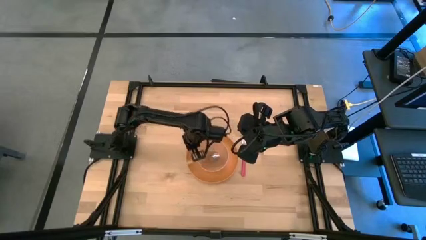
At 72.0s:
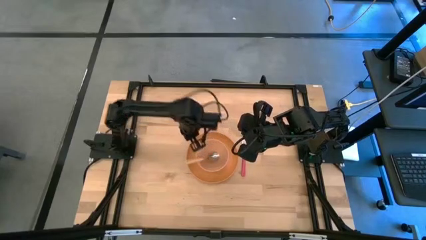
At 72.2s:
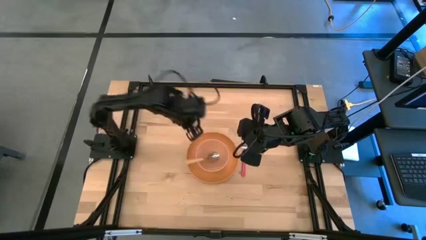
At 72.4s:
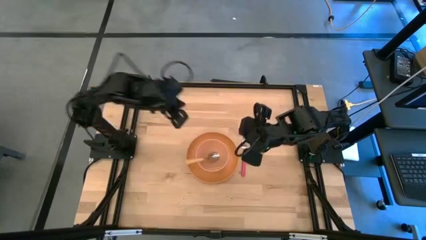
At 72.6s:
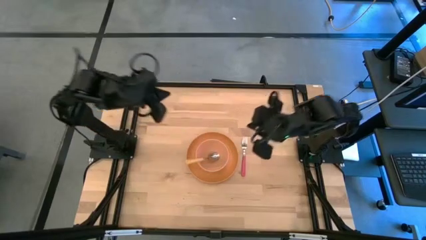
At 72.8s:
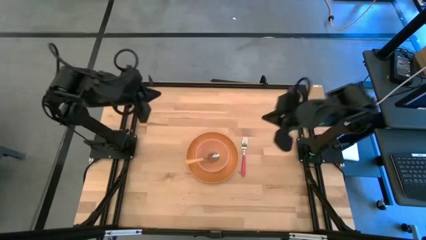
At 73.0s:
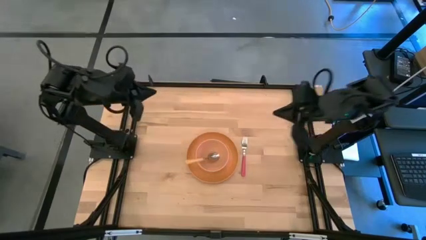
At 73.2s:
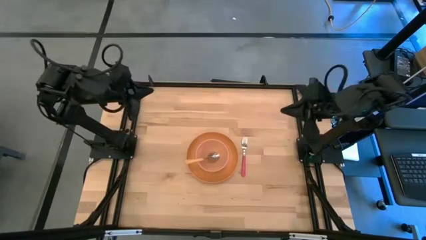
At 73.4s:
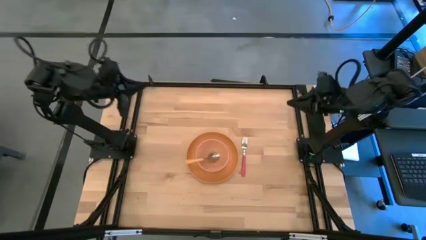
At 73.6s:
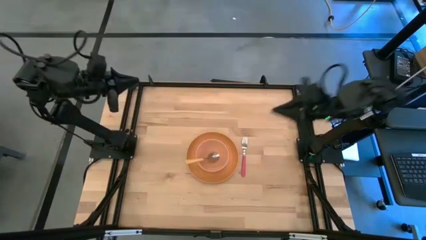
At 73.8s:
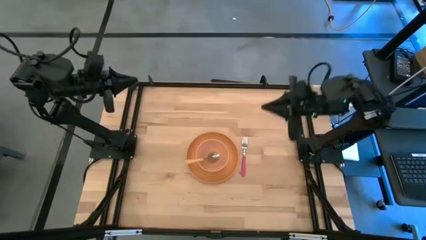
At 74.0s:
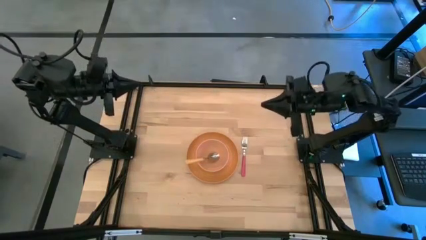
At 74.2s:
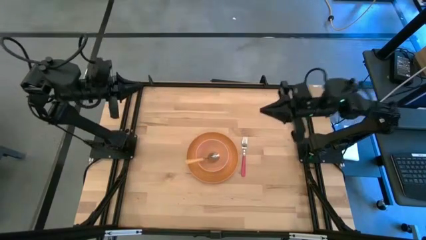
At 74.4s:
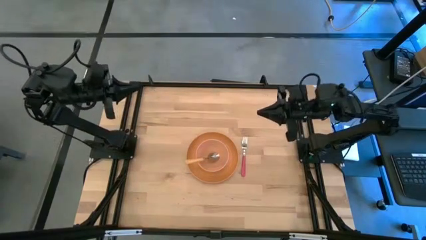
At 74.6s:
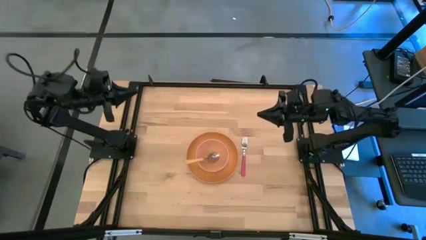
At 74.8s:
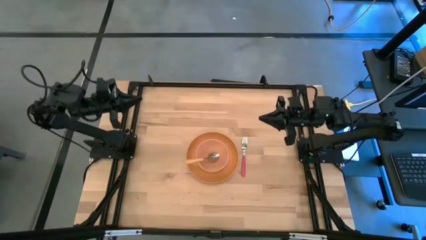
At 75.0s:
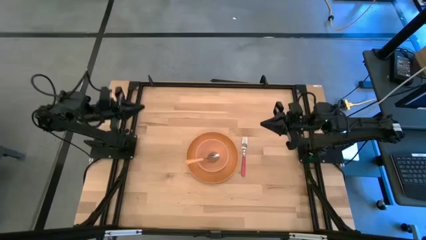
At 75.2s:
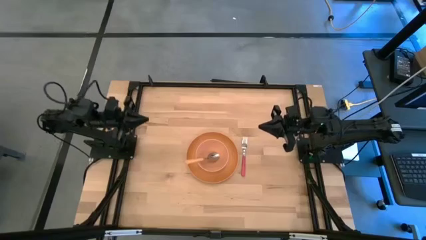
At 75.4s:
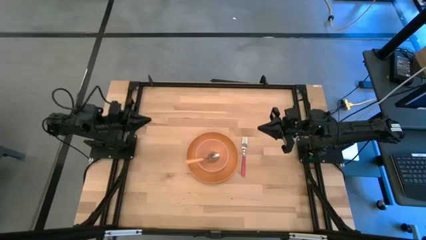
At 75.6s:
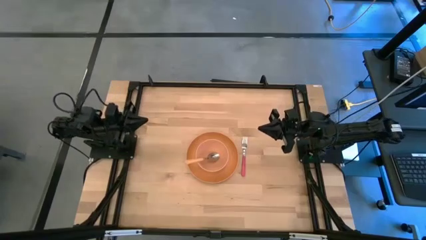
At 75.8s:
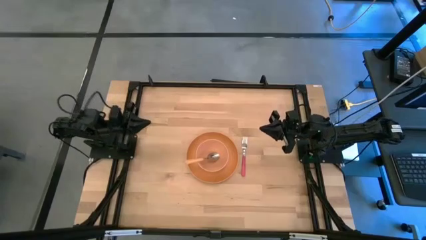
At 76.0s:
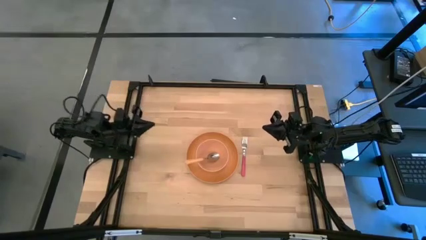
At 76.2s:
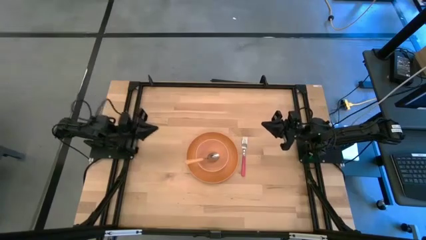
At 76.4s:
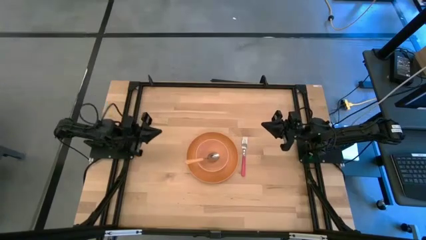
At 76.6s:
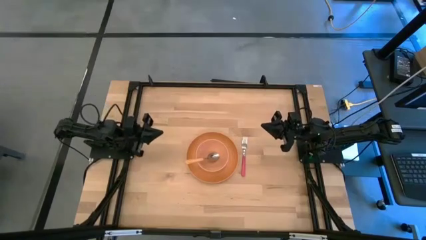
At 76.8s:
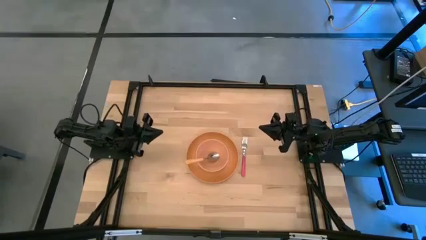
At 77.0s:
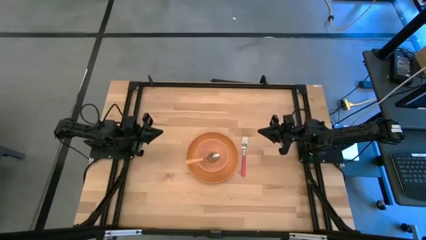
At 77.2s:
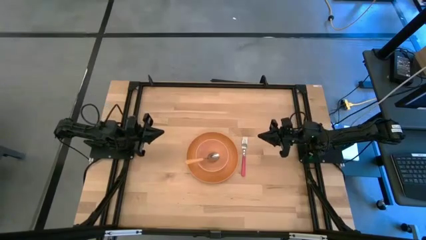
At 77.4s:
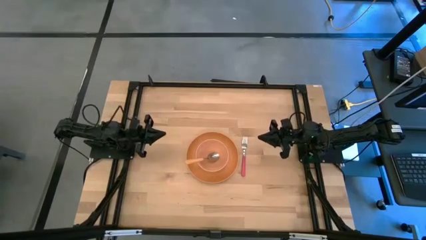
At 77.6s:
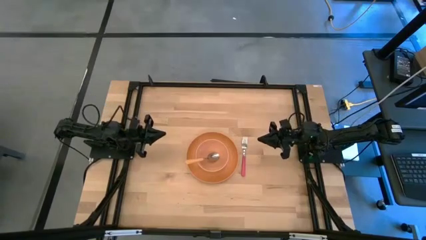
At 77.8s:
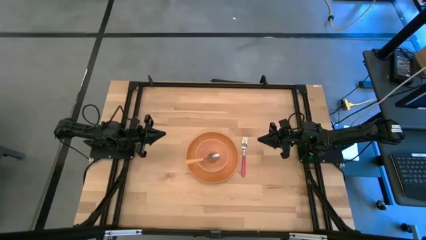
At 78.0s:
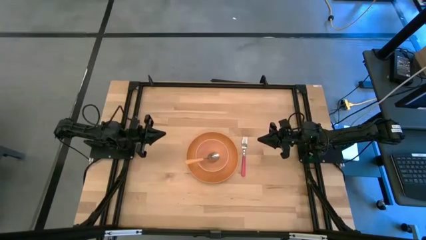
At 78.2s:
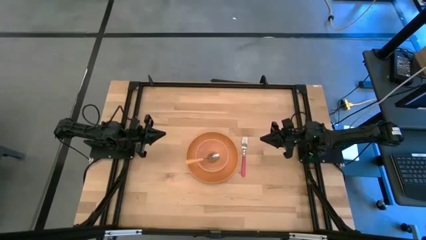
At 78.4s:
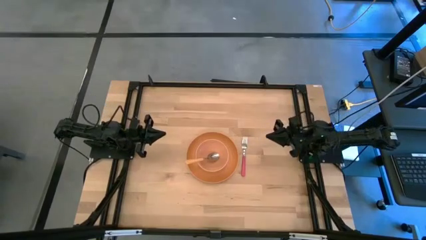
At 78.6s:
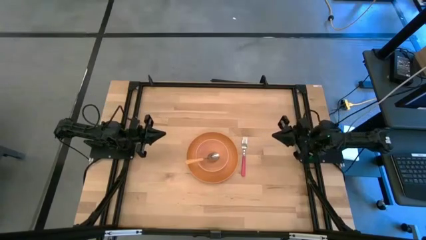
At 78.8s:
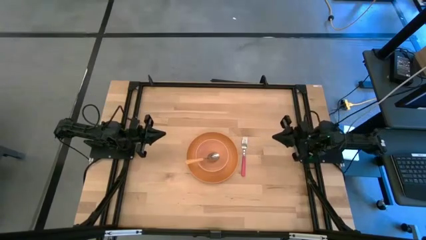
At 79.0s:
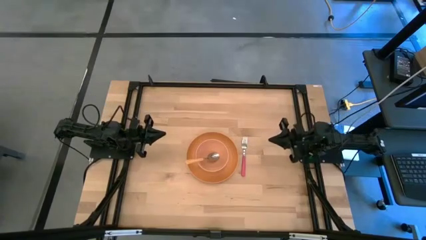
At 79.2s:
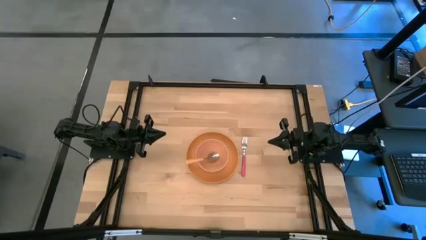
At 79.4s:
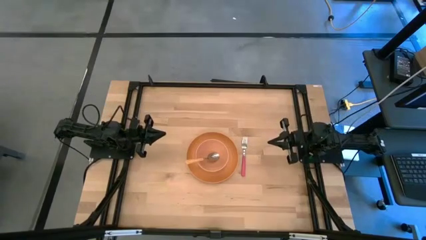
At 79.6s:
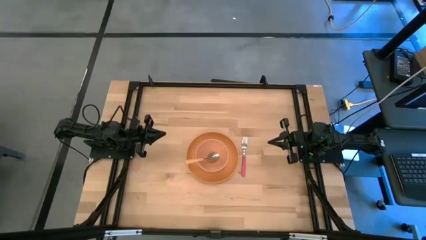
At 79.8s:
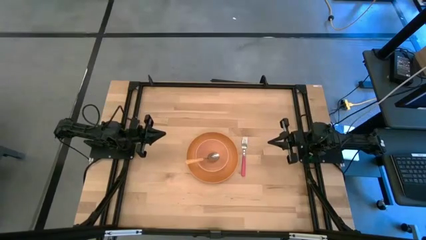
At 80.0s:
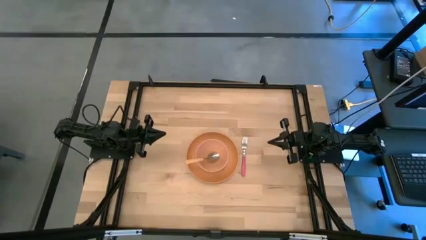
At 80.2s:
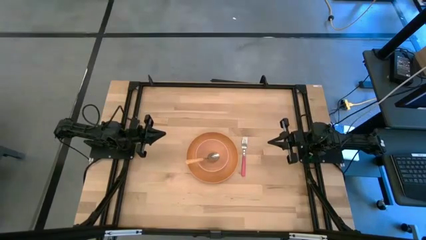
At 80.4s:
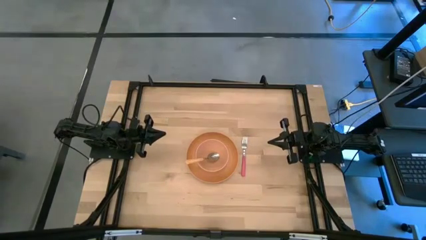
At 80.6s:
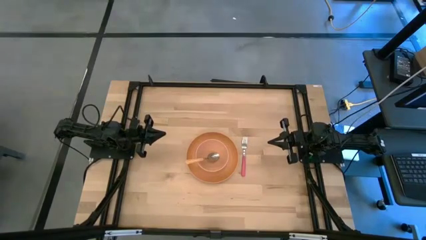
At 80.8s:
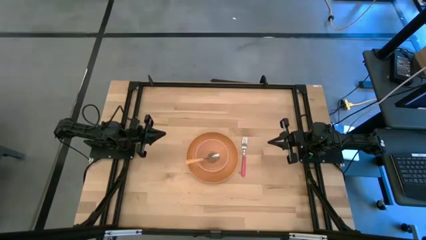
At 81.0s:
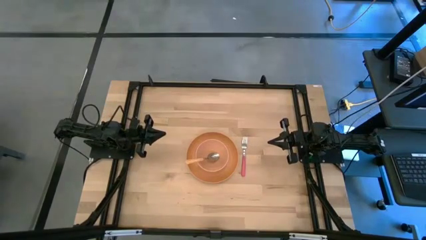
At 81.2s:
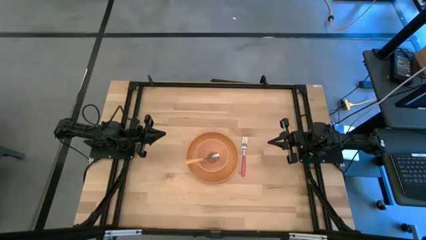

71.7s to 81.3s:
Task: Set table place
Return to Home Position

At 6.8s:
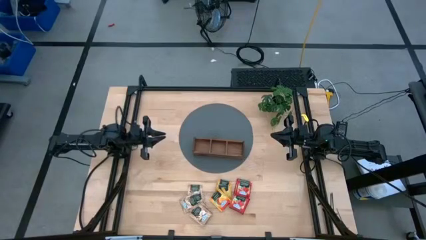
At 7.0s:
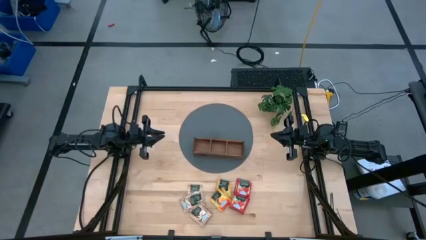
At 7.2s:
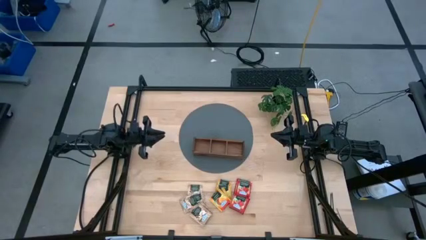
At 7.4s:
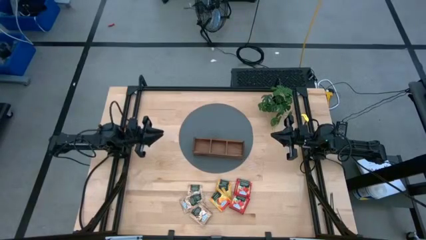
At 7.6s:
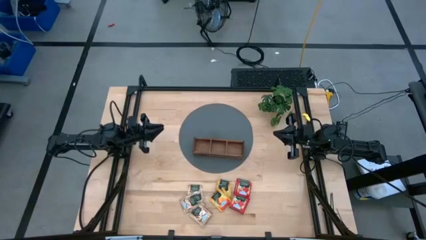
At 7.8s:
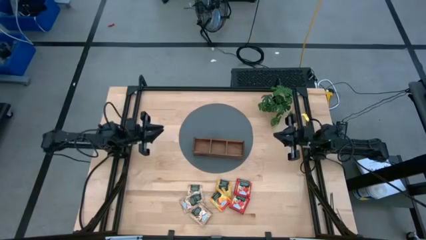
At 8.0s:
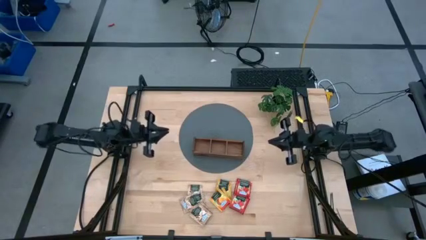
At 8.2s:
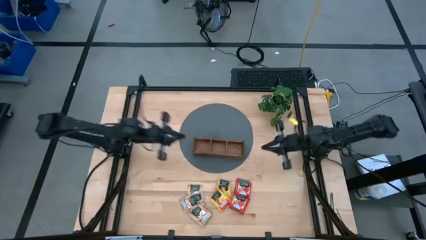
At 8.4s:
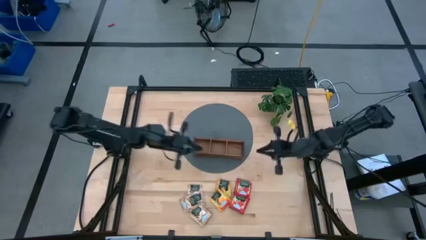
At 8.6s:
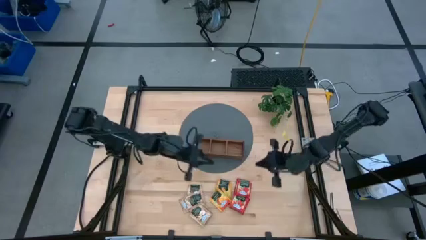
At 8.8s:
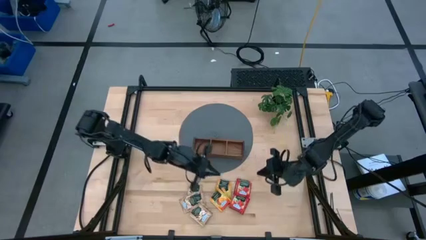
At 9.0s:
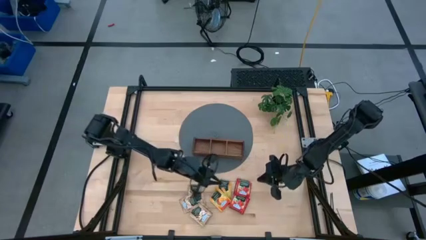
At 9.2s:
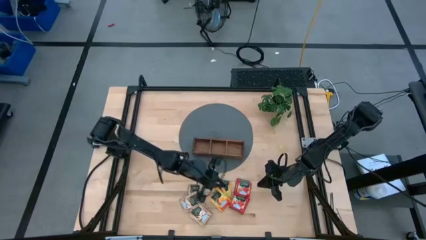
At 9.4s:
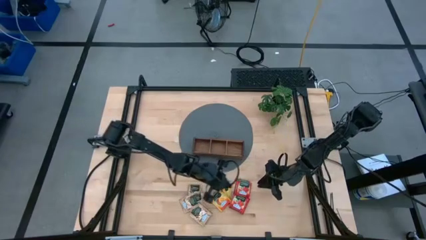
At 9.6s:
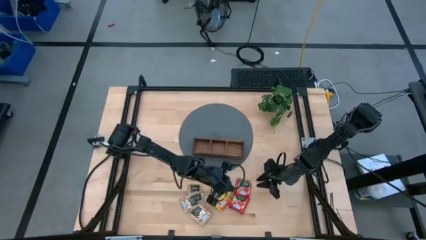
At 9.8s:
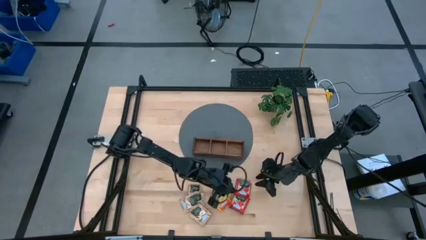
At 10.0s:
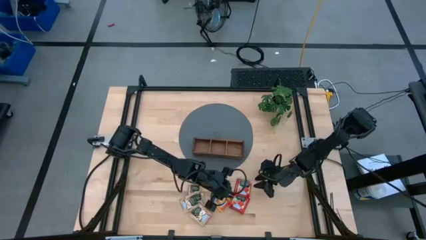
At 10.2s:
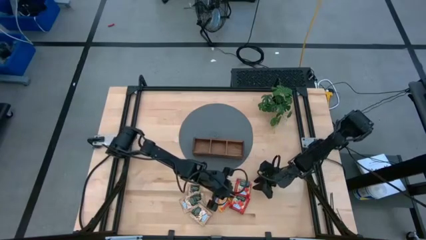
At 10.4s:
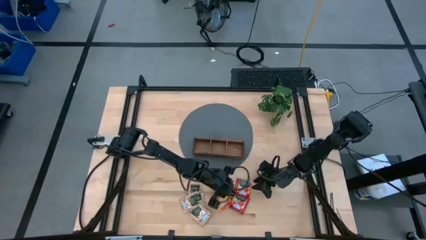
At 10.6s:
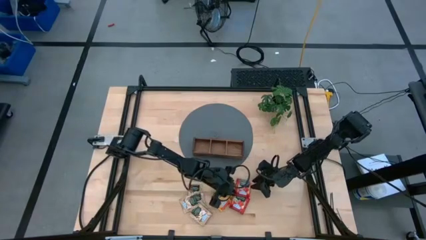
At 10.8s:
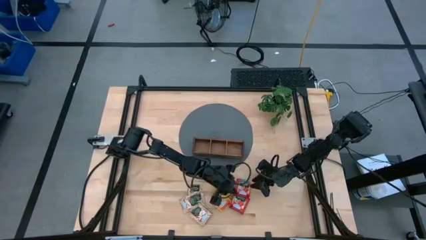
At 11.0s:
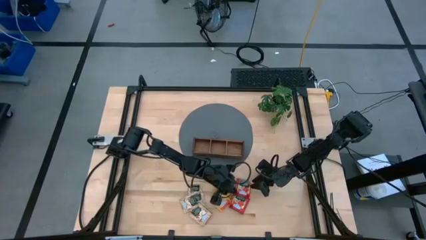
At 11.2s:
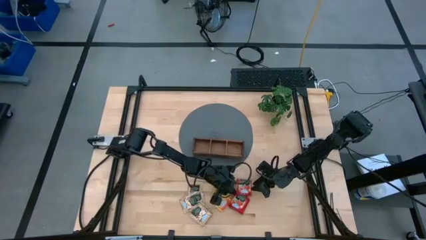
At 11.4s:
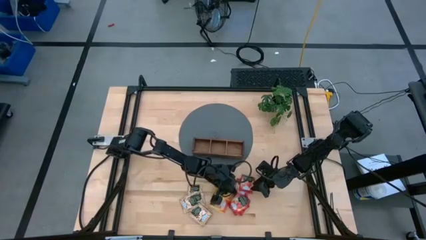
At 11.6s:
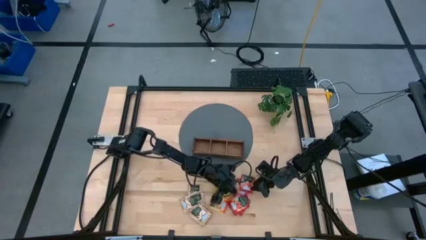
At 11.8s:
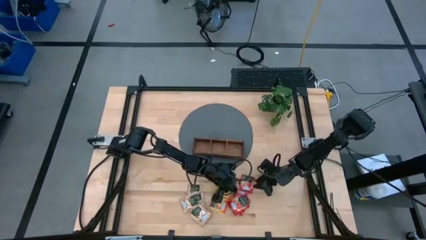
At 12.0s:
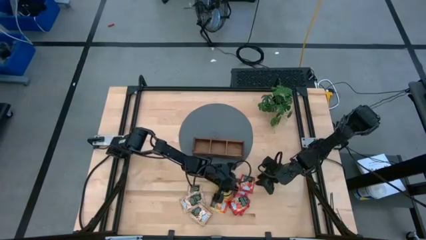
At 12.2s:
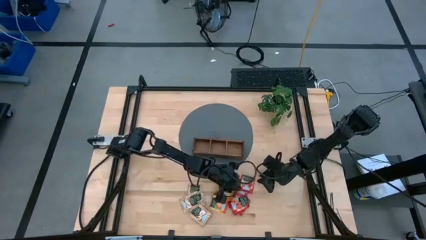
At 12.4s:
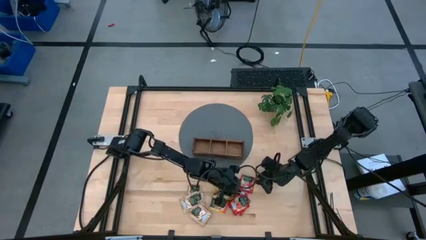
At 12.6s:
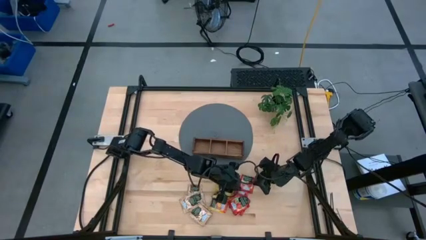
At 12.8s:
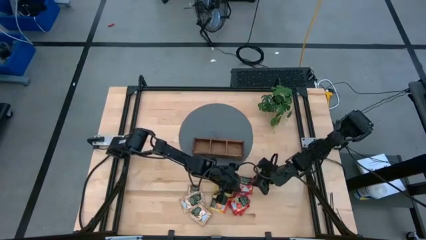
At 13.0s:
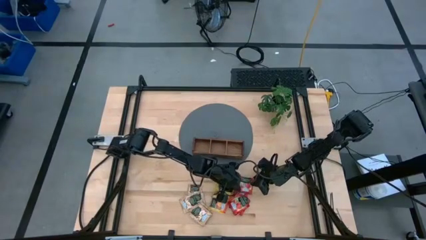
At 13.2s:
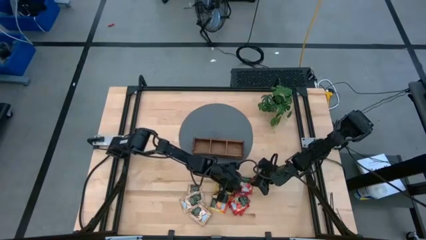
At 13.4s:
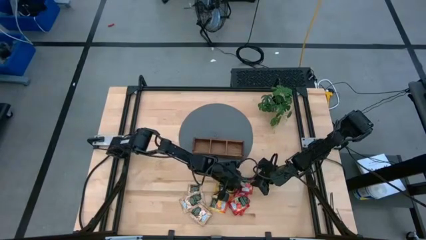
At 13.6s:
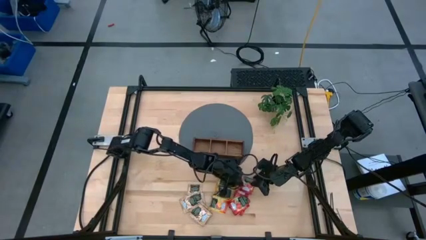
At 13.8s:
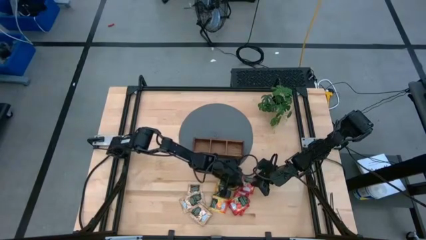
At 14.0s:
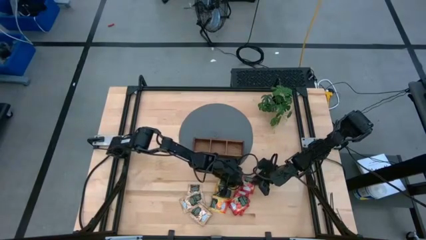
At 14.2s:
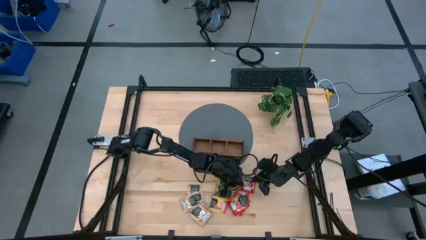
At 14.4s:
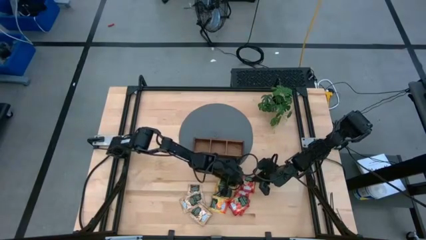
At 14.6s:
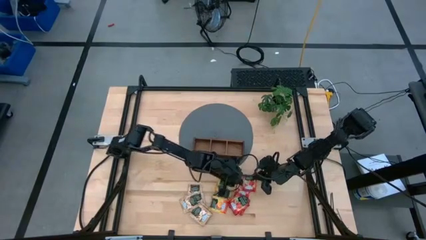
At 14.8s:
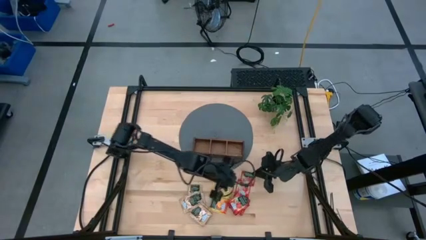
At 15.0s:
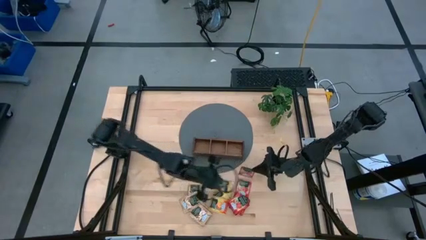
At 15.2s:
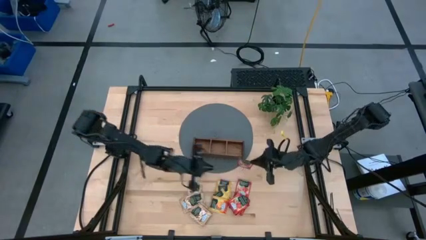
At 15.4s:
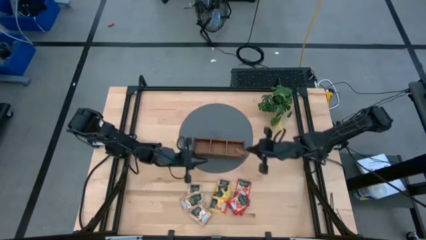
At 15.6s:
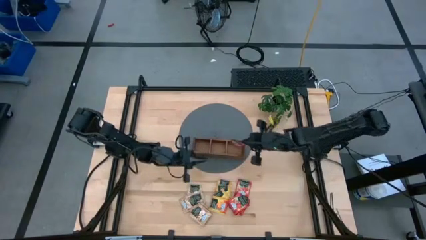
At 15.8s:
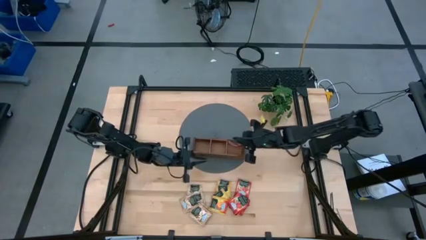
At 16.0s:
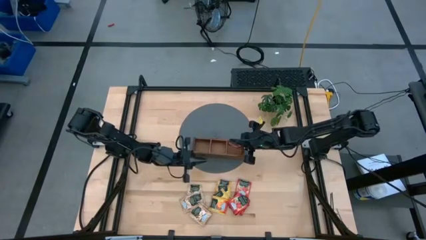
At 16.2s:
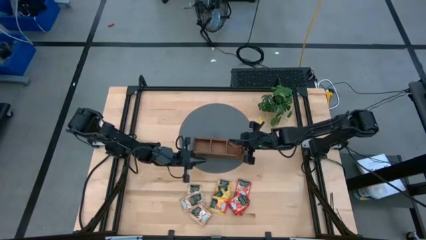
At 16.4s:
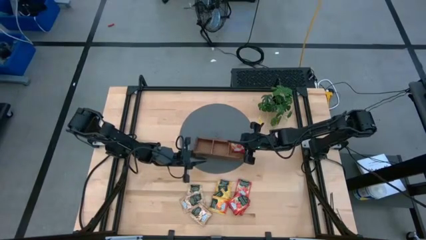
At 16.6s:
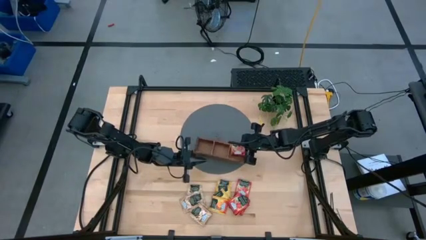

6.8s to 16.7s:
Task: Pick & Place Tea
Put the red tea bag into the right section of the wooden organizer
